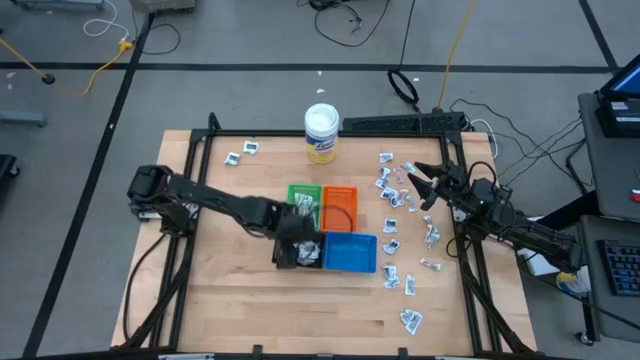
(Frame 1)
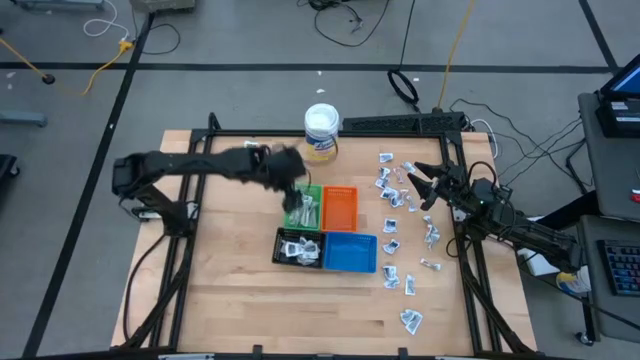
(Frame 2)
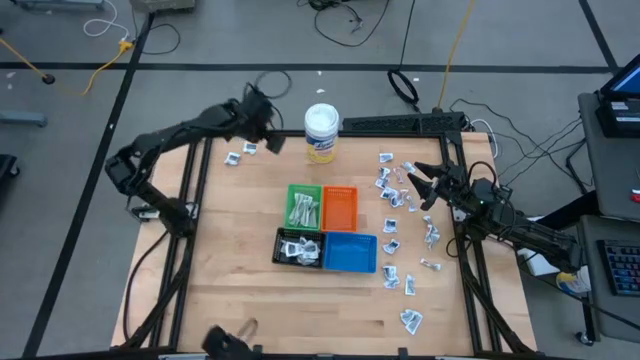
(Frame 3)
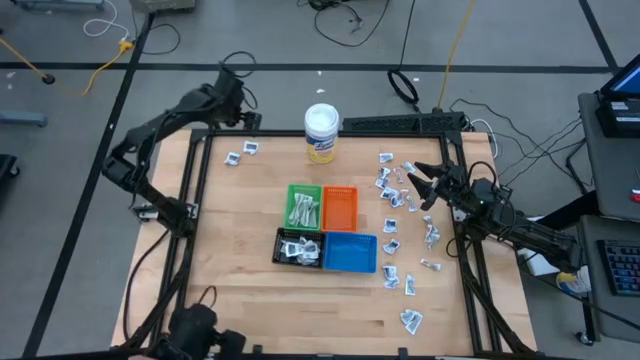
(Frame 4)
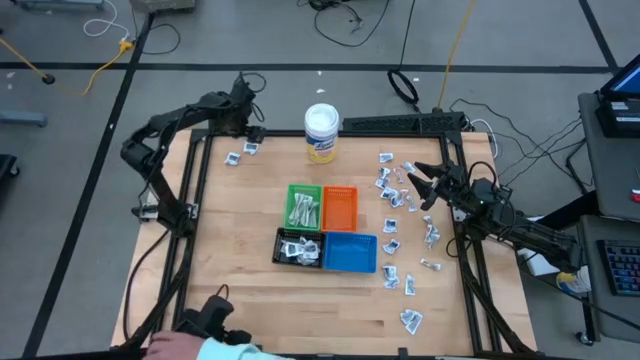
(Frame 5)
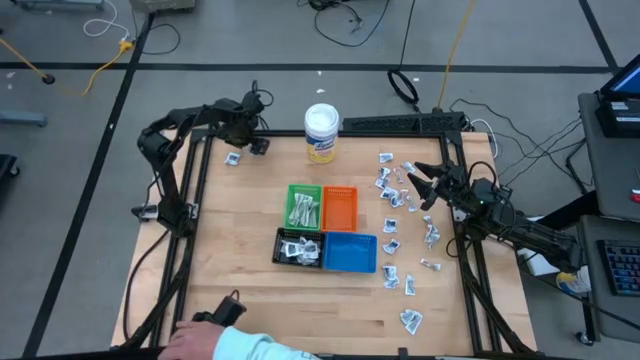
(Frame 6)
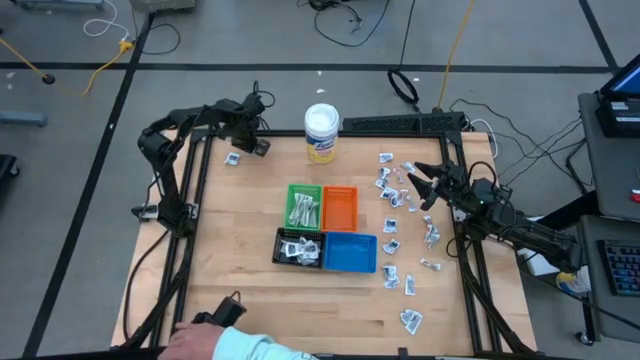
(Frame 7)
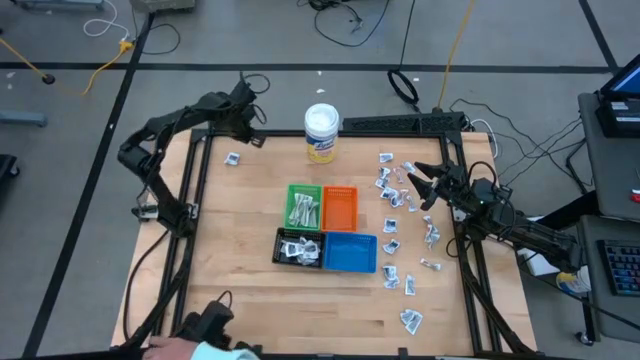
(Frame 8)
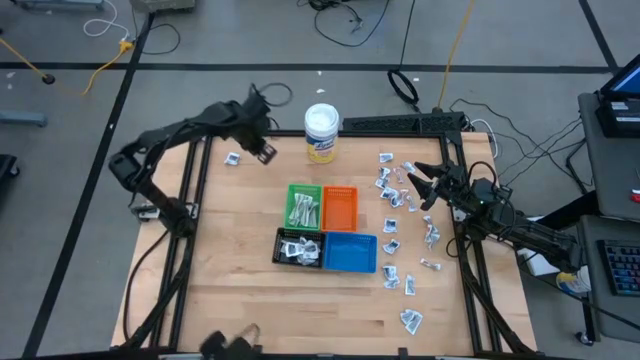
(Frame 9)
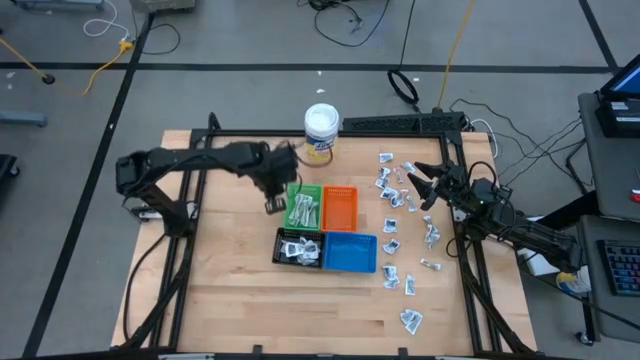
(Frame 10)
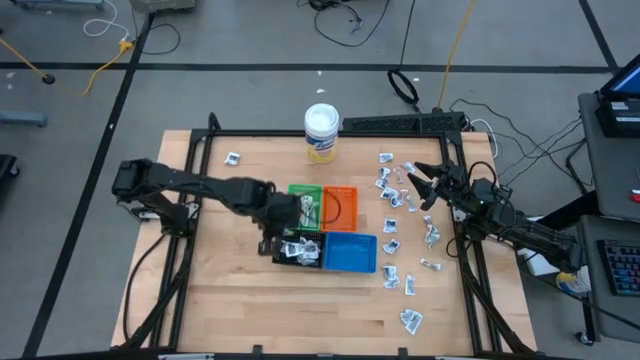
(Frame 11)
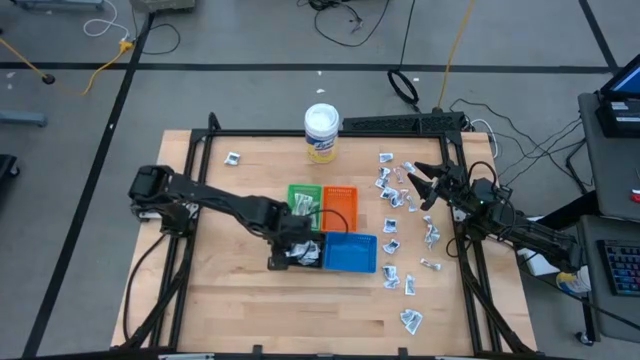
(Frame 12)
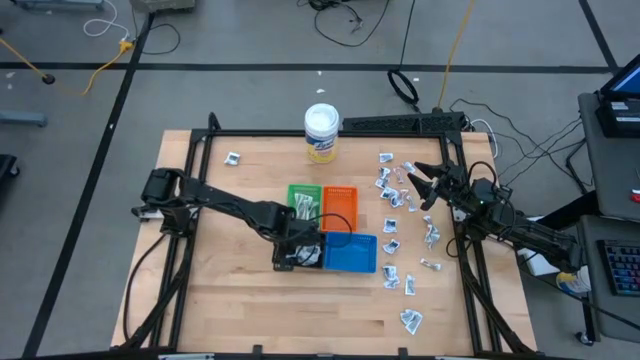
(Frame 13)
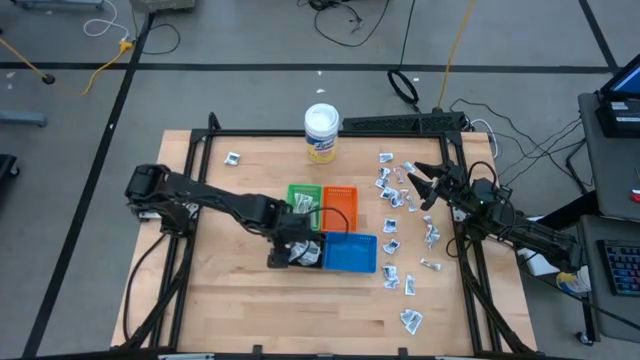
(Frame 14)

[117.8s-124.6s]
Task: Pick & Place First Aid Supplies
Put the towelette pack into the black bin

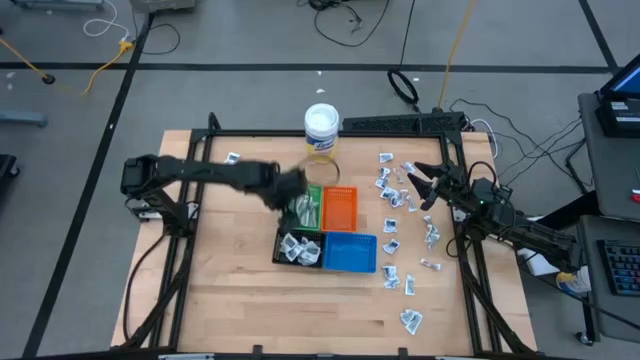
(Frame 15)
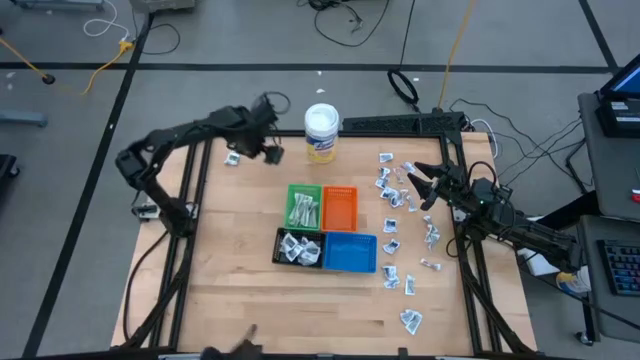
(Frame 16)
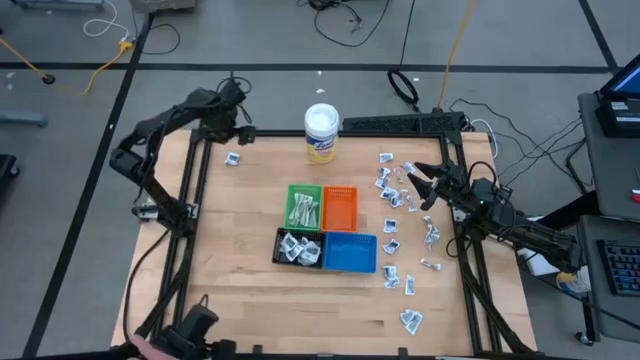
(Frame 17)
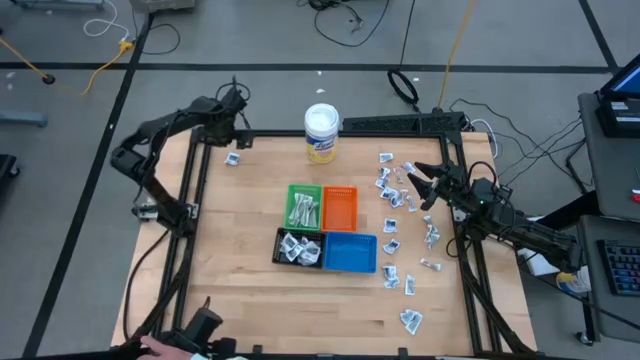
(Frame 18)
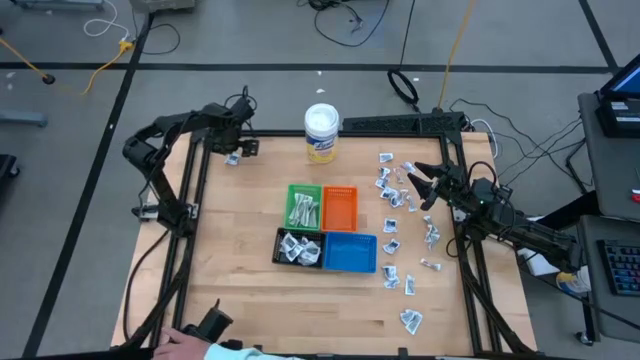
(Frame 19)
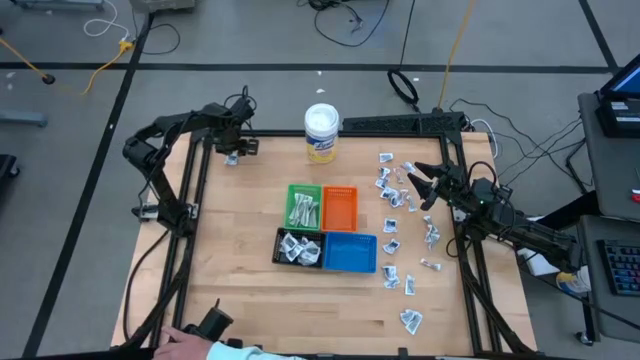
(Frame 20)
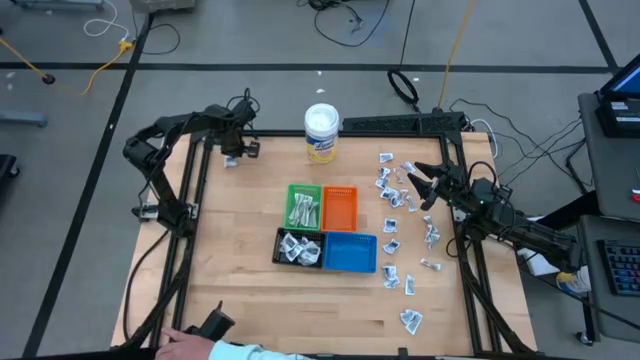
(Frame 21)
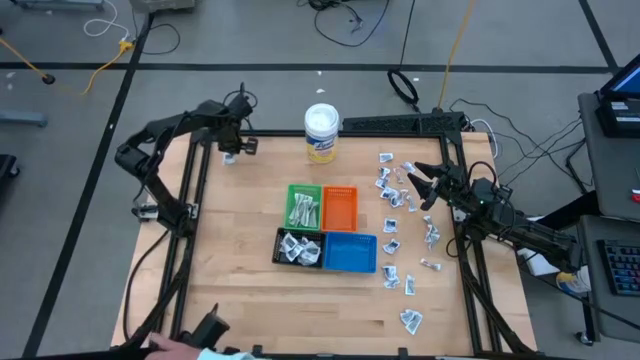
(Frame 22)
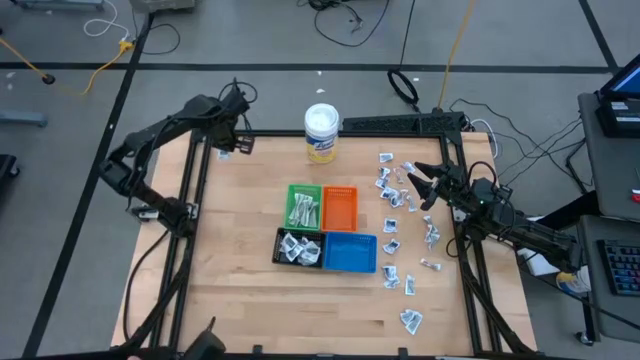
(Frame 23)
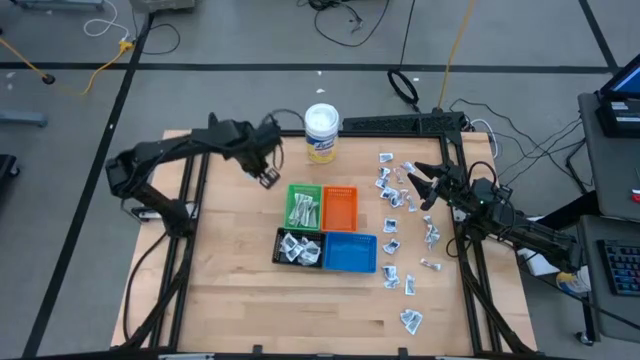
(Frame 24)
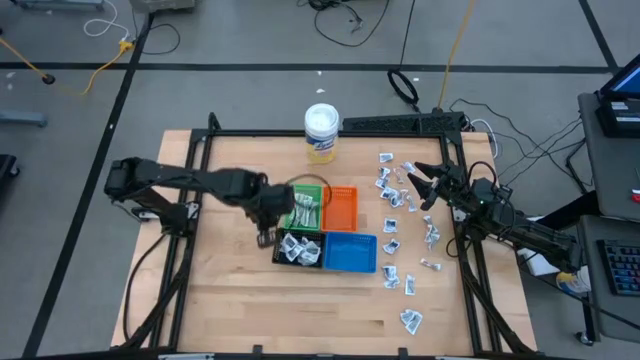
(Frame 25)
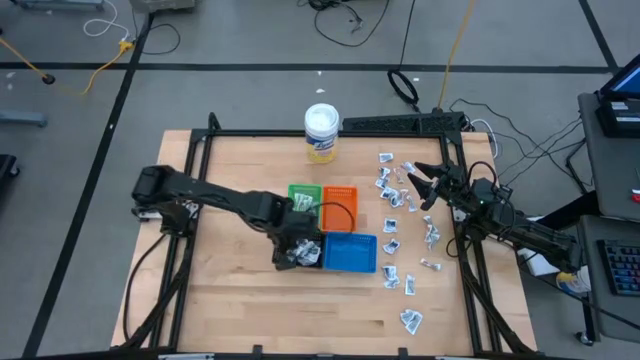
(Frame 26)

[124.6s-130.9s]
Put the towelette pack into the black bin

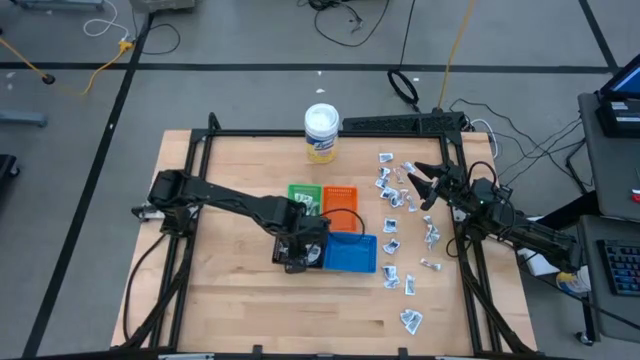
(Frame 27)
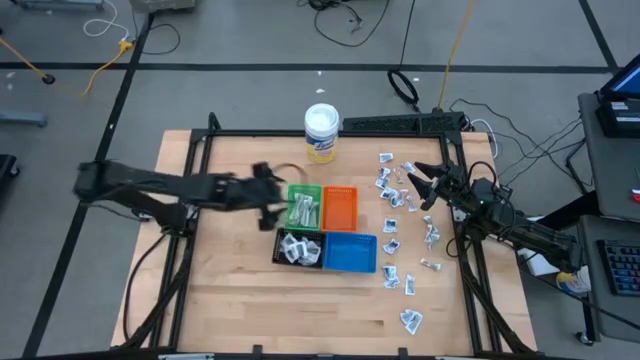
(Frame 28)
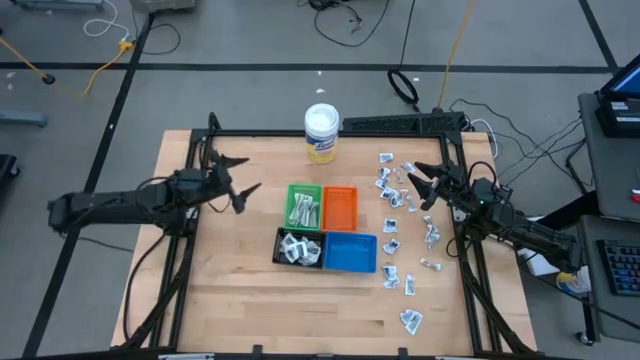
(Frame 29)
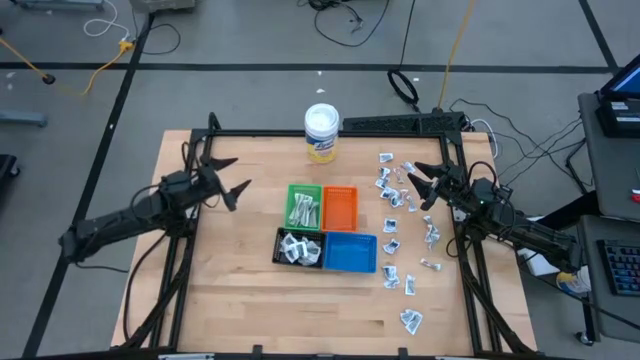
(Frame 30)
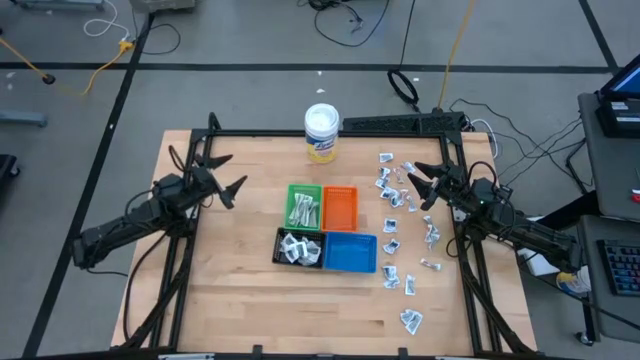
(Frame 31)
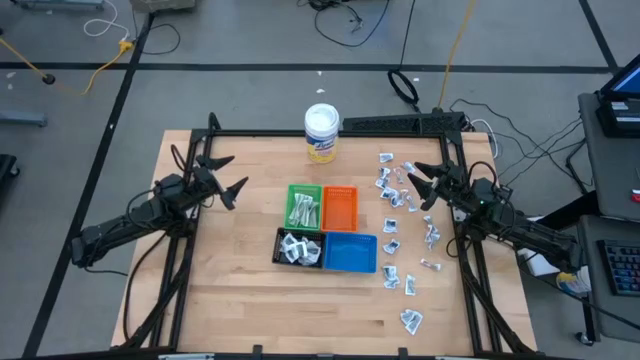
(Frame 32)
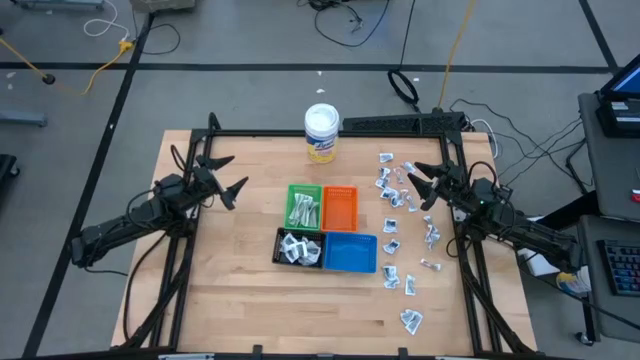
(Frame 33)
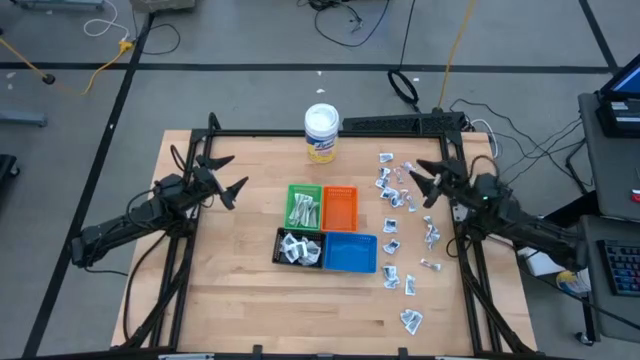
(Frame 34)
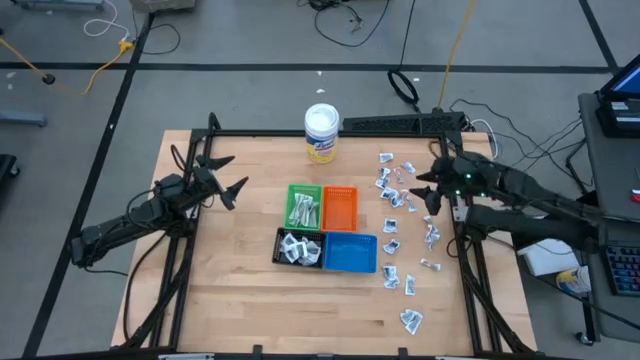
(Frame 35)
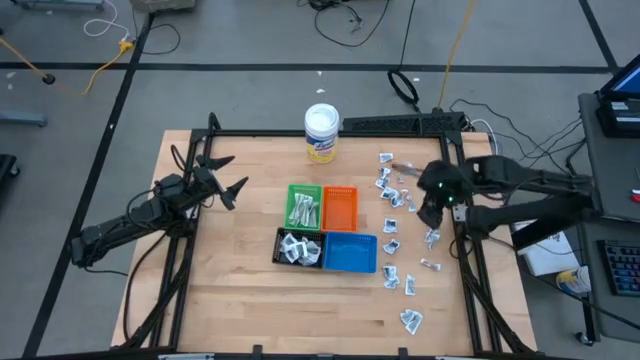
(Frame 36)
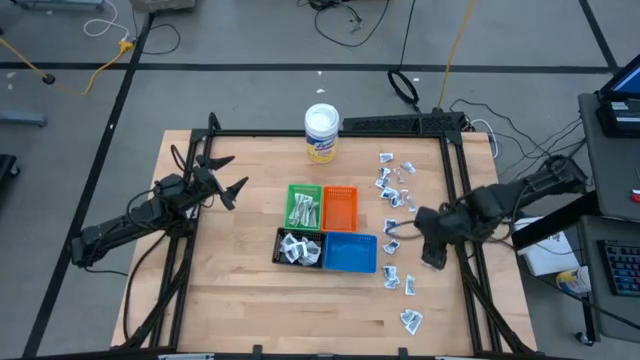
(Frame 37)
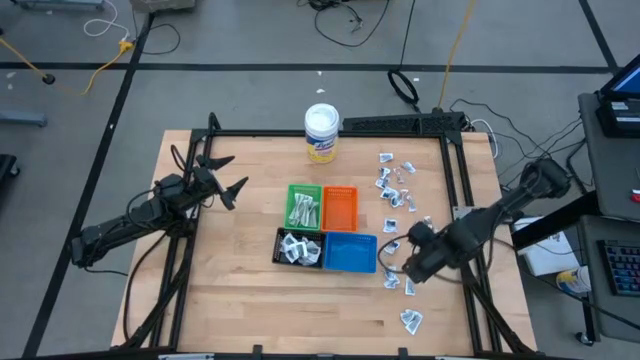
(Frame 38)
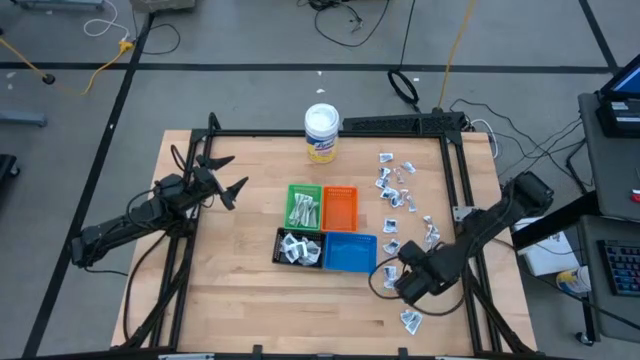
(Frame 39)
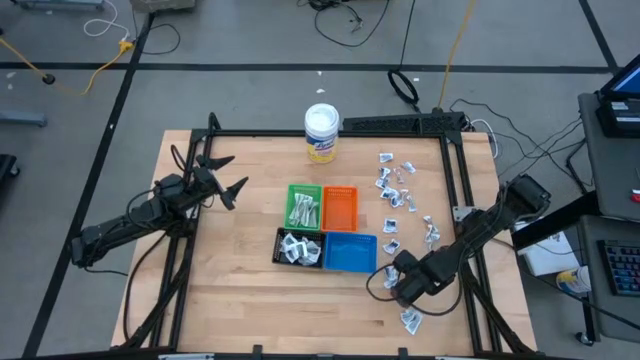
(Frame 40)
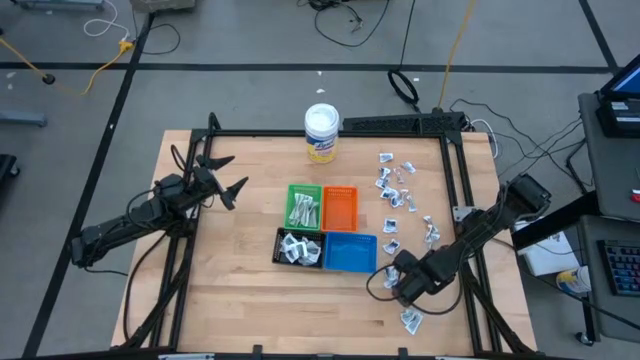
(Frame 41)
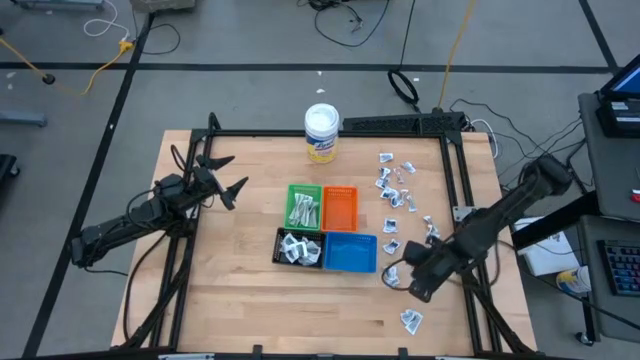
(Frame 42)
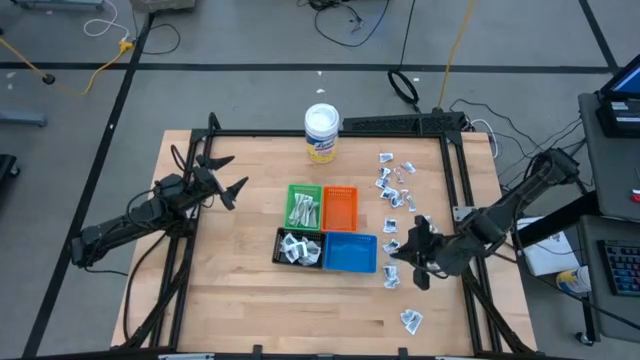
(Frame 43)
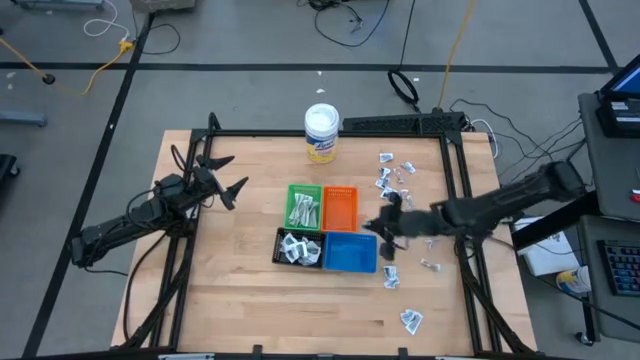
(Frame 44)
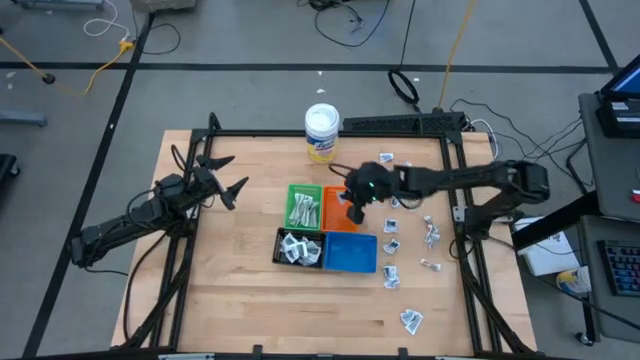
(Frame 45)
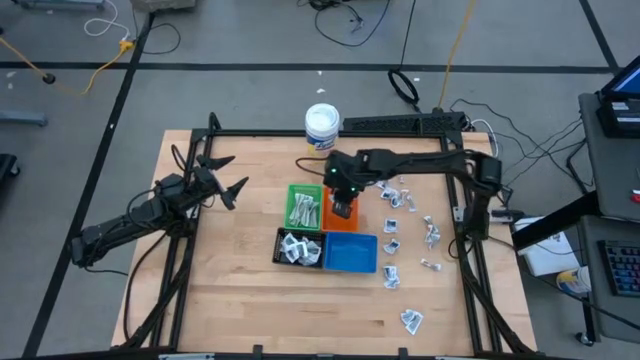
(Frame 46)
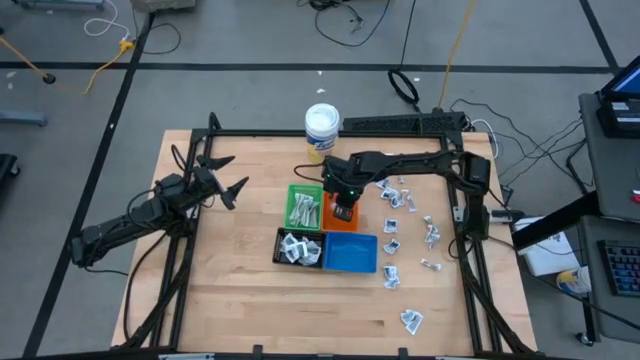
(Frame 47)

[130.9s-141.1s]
Put the ointment pack into the orange bin
